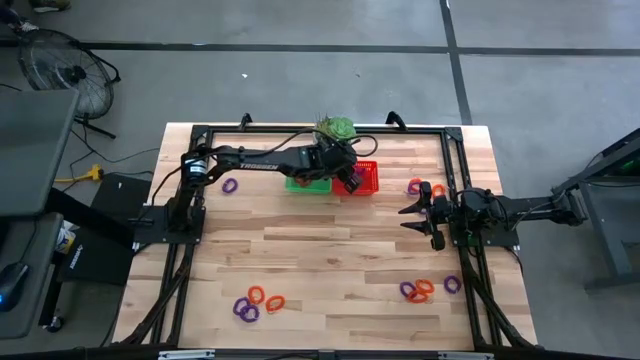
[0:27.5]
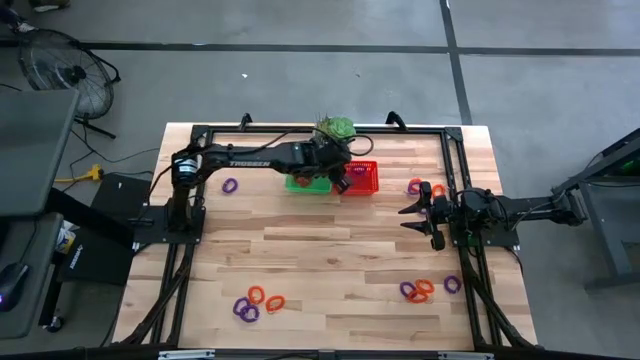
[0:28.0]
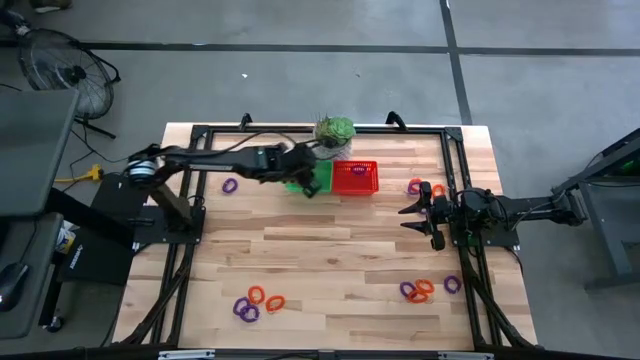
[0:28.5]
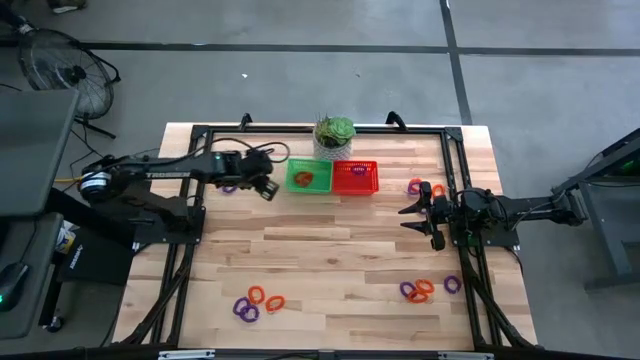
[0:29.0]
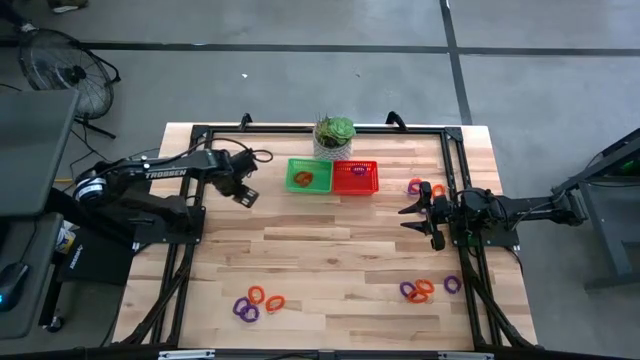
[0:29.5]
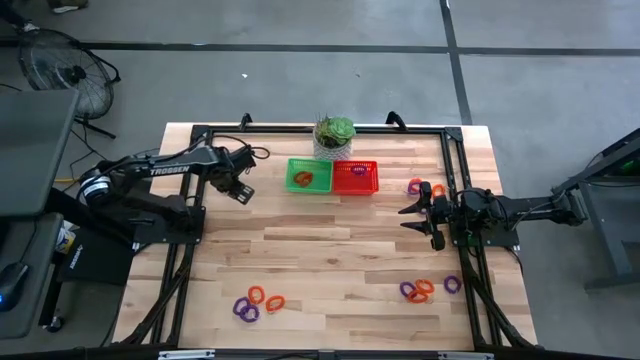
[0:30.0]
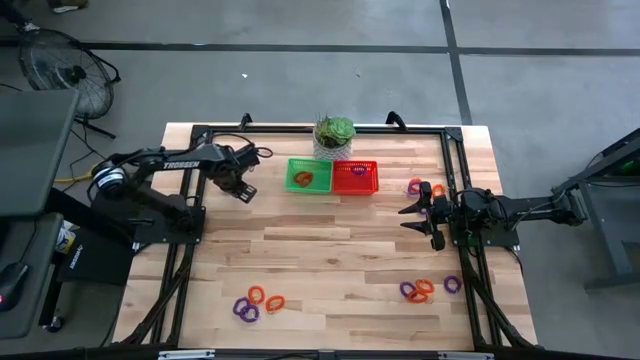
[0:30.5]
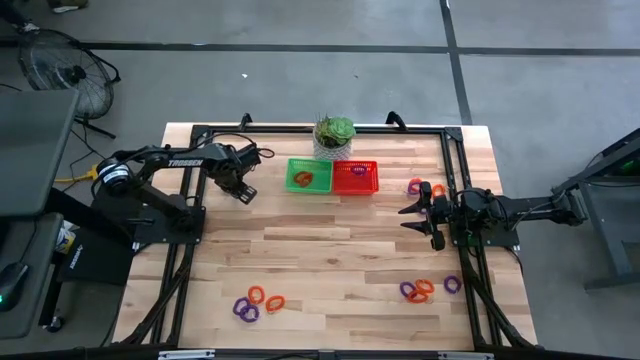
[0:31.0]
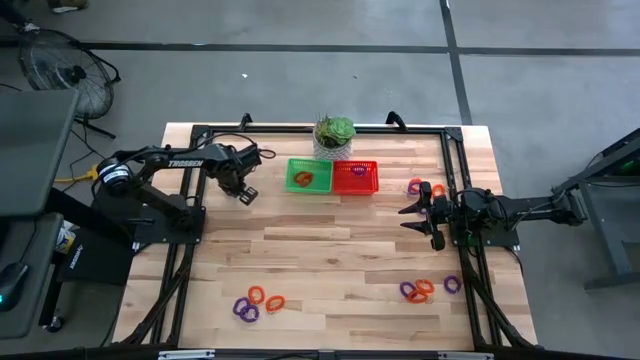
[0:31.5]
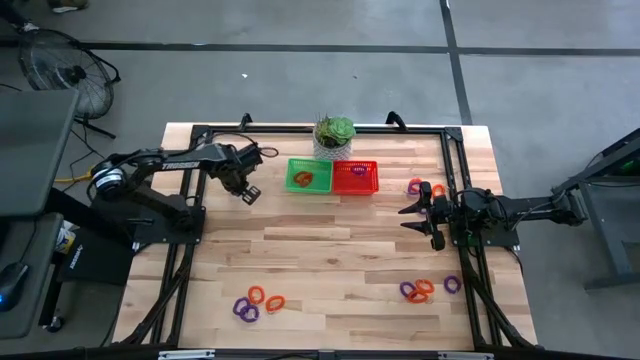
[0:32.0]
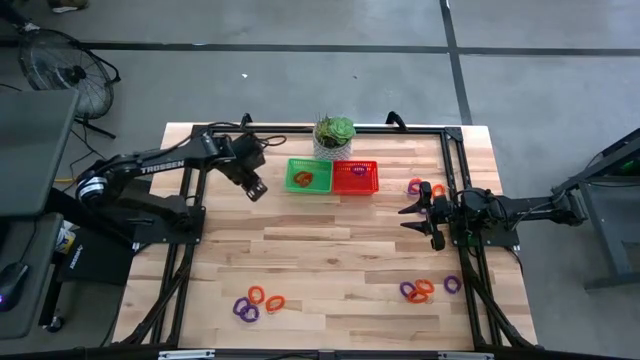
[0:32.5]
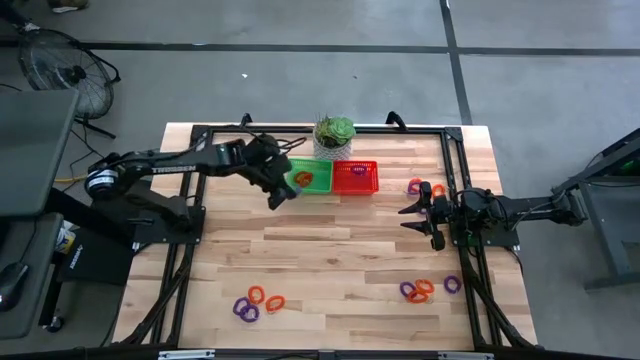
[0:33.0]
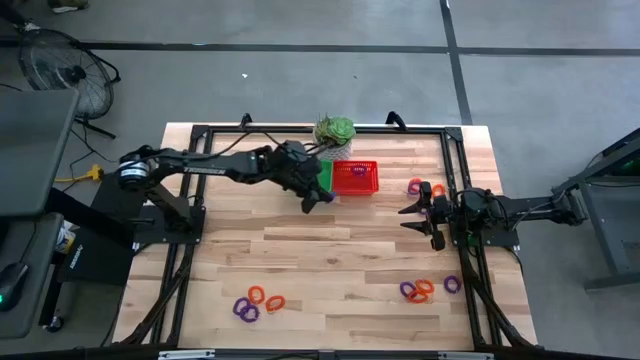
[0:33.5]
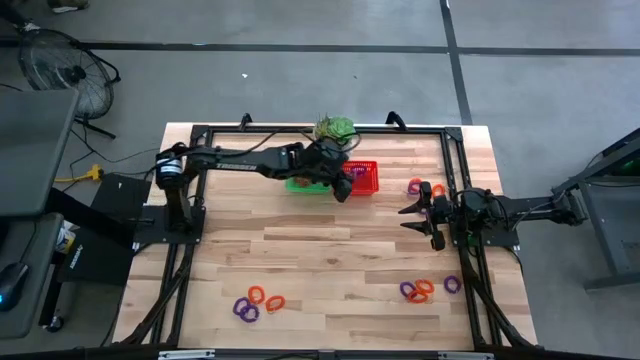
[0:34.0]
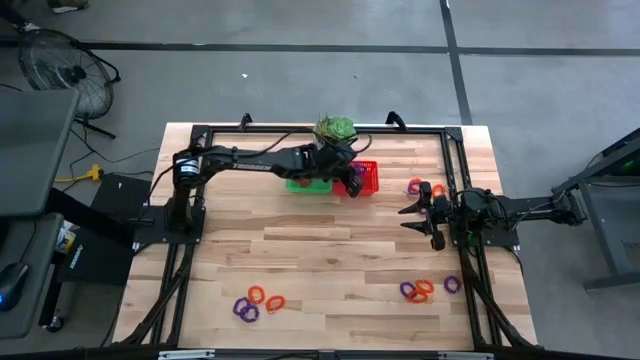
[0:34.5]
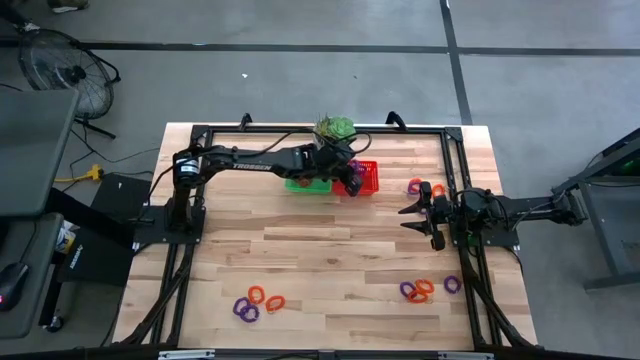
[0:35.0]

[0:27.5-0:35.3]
Task: Sort spring keychains
Put the purple spring keychain into the orange bin

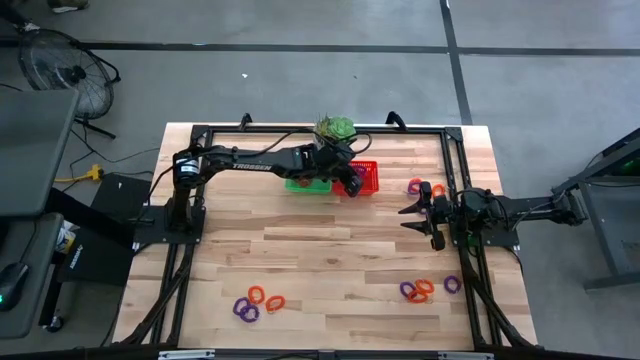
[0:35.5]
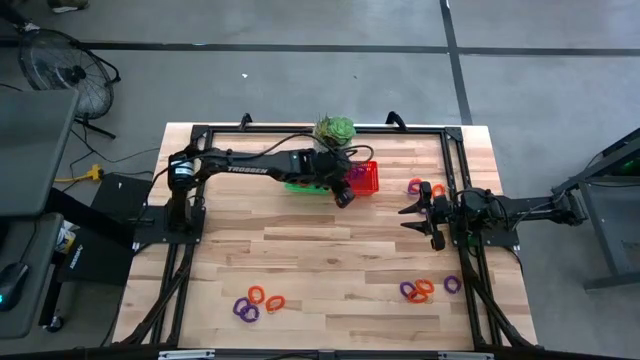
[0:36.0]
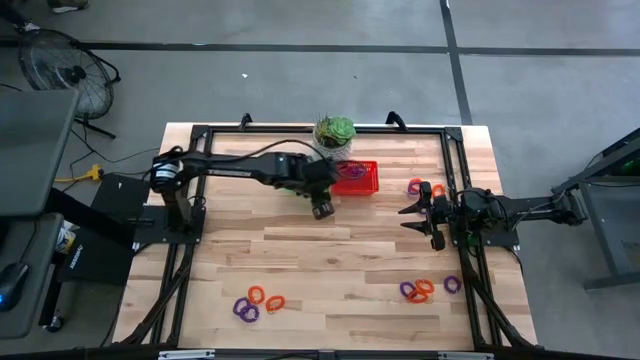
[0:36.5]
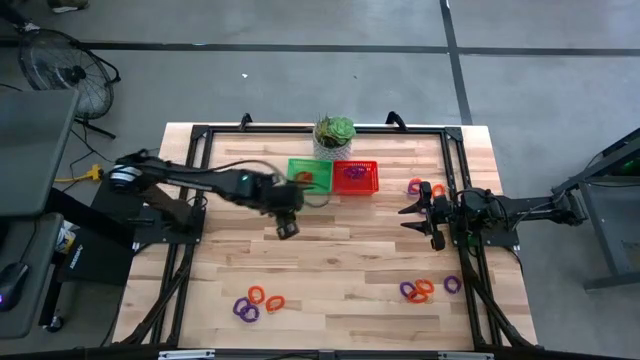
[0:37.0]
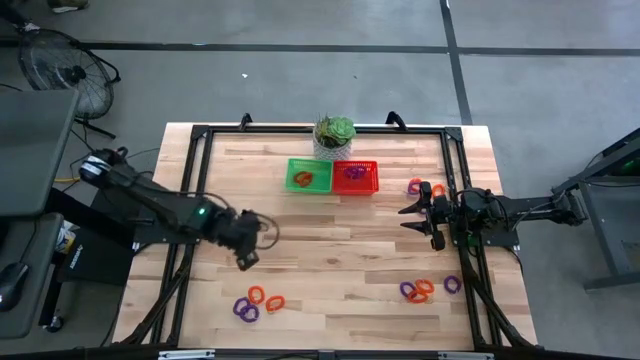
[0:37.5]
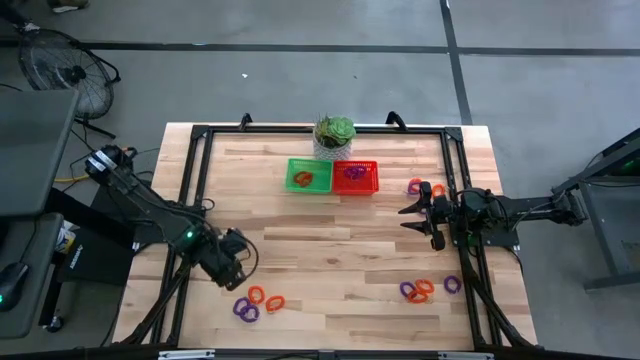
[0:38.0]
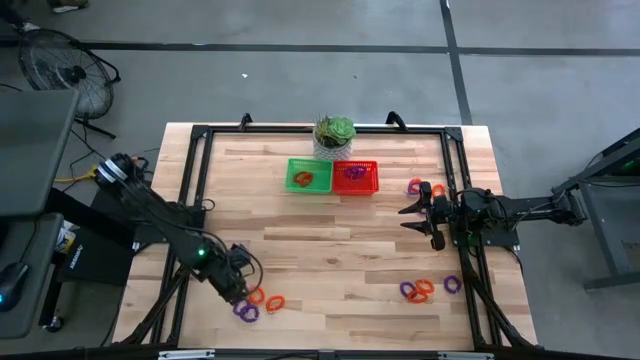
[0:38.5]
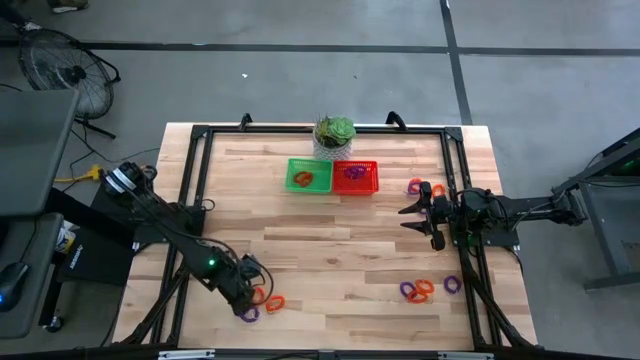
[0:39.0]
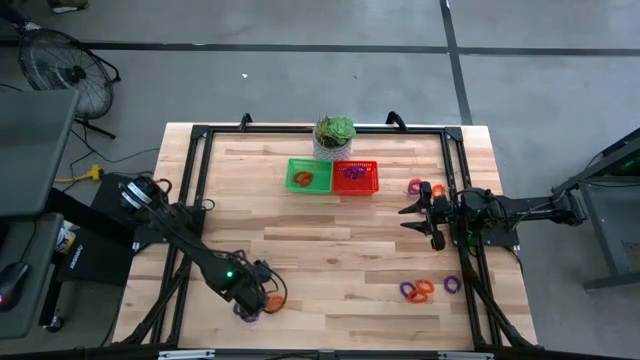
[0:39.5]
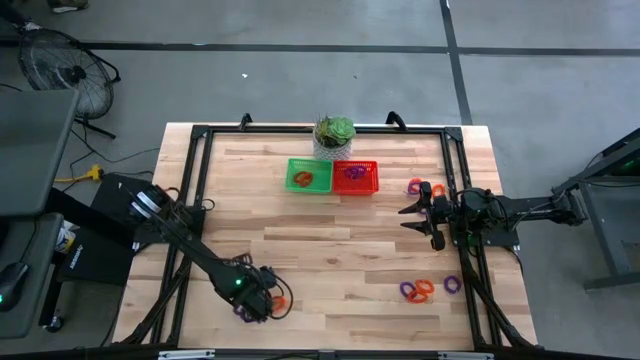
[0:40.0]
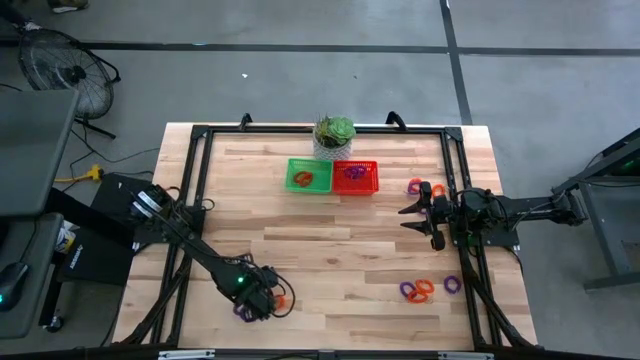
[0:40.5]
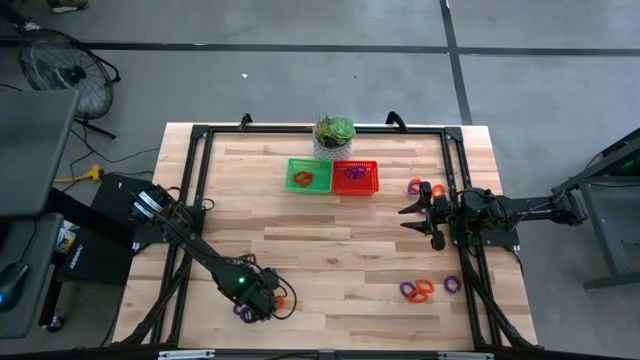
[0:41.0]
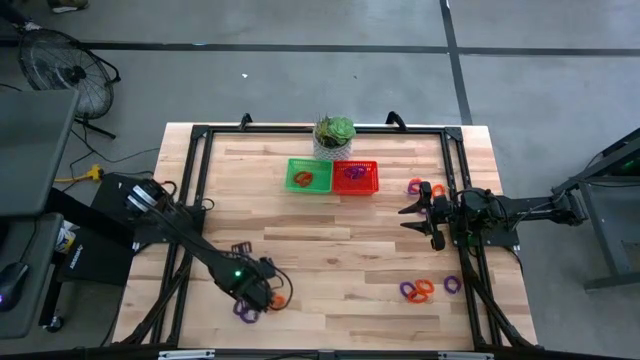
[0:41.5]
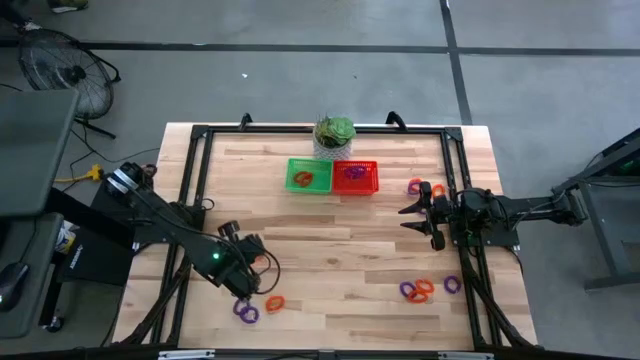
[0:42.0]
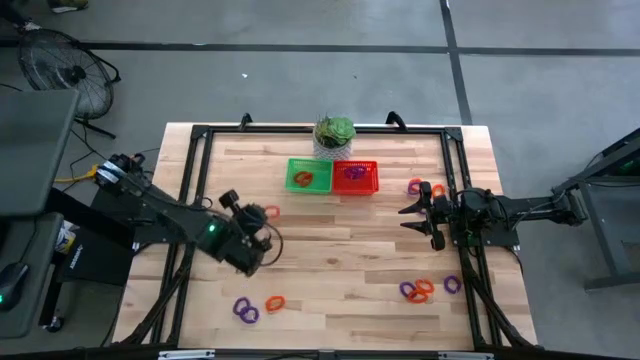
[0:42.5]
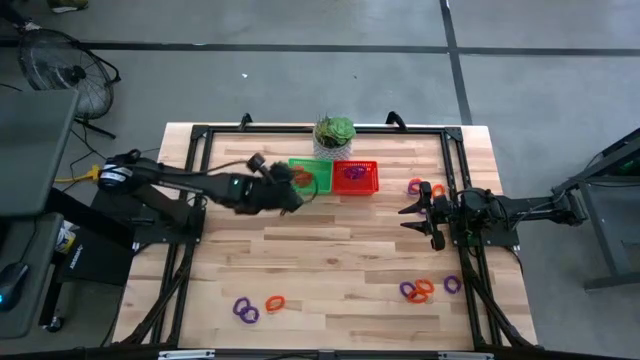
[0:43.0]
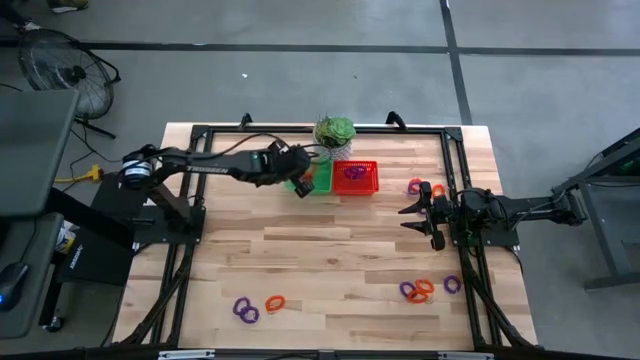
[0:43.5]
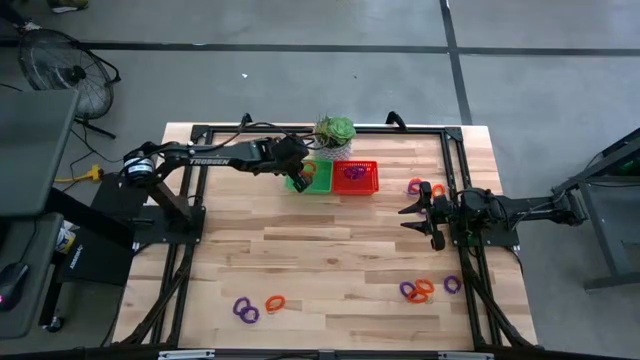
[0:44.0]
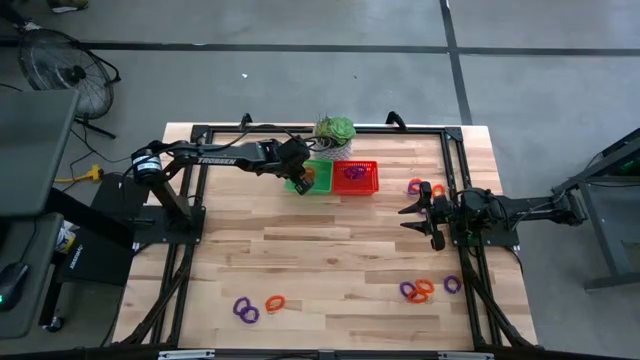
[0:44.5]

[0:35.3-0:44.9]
Put the orange spring keychain into the green bin

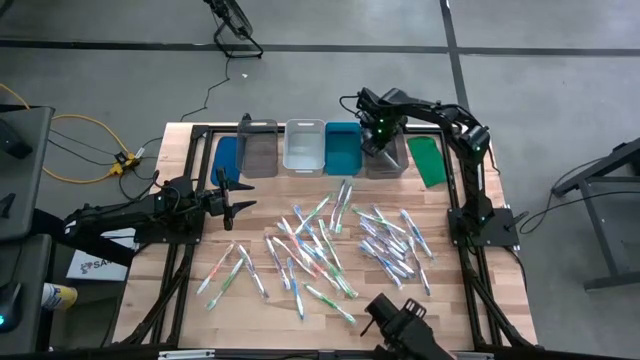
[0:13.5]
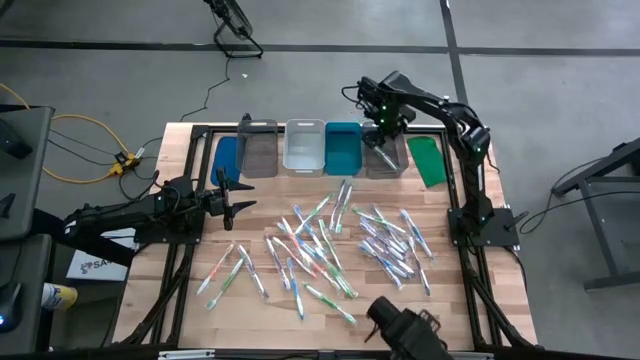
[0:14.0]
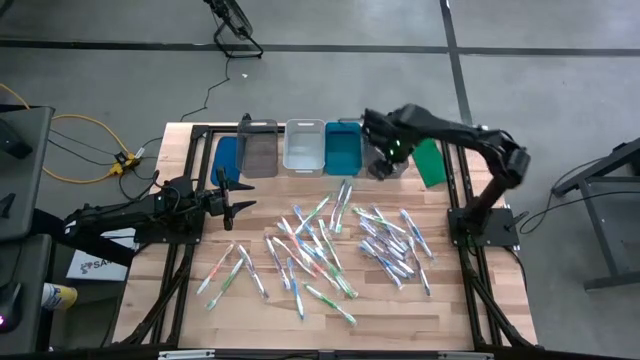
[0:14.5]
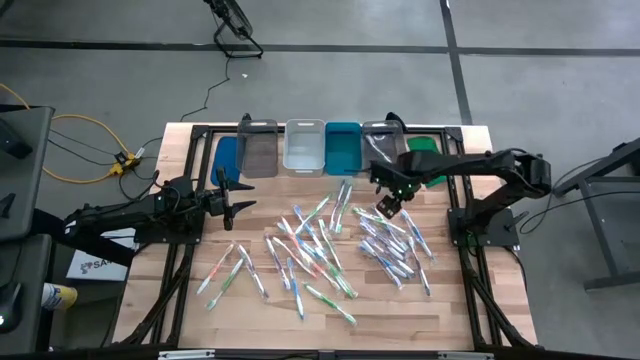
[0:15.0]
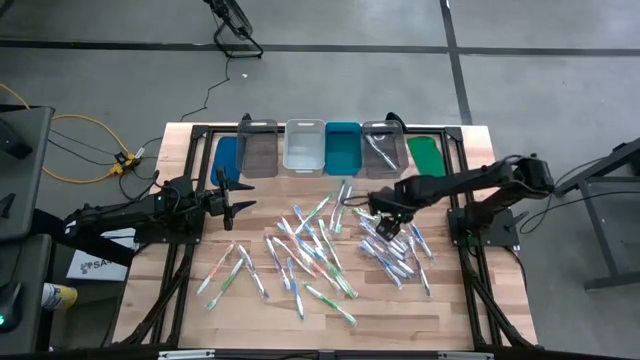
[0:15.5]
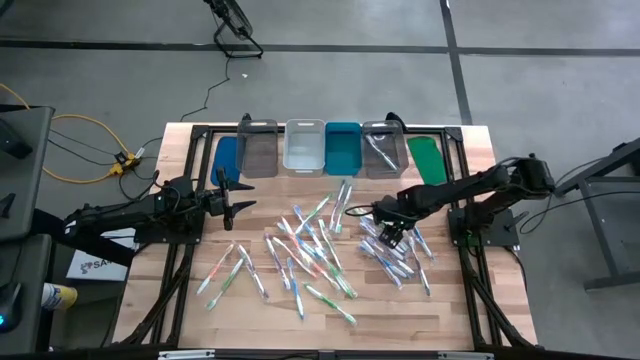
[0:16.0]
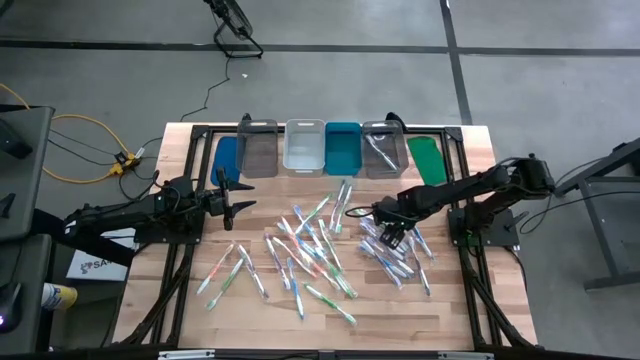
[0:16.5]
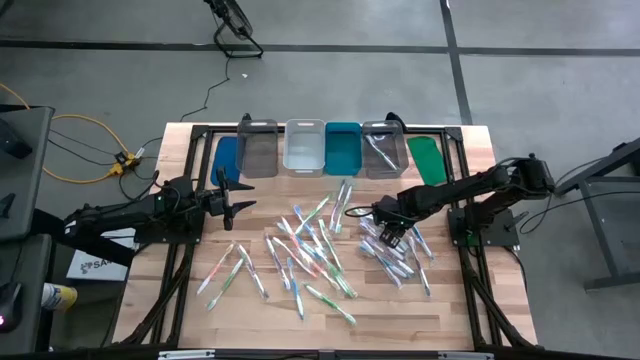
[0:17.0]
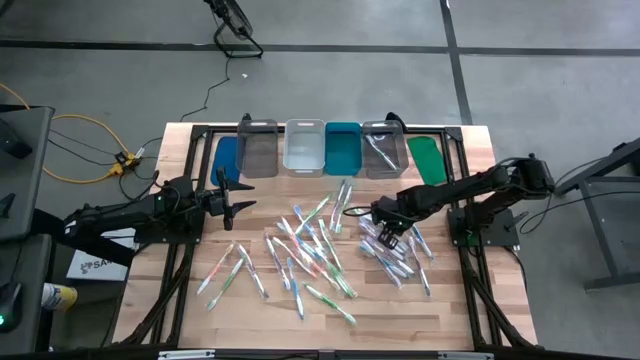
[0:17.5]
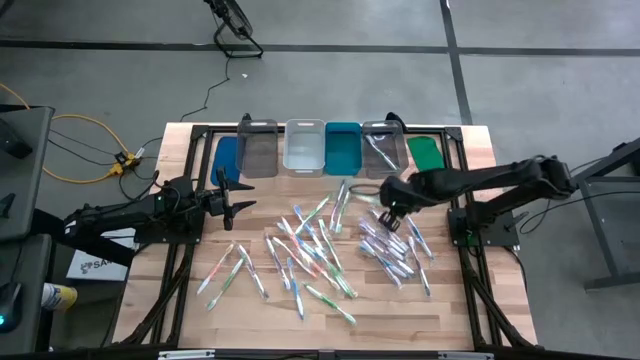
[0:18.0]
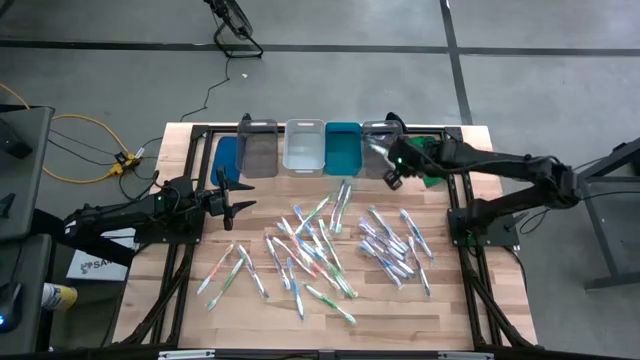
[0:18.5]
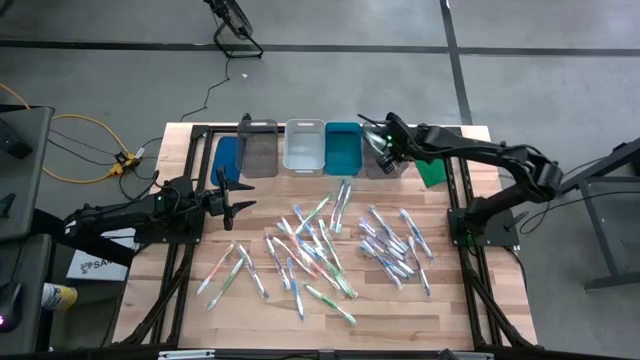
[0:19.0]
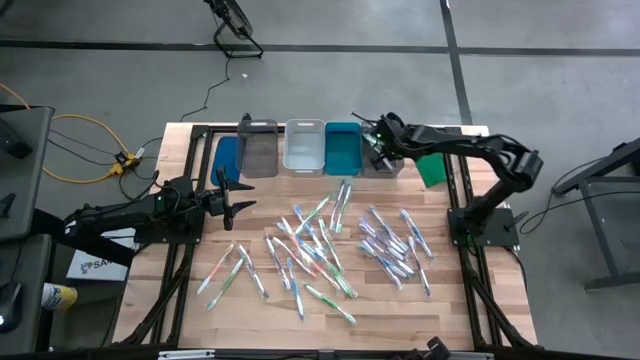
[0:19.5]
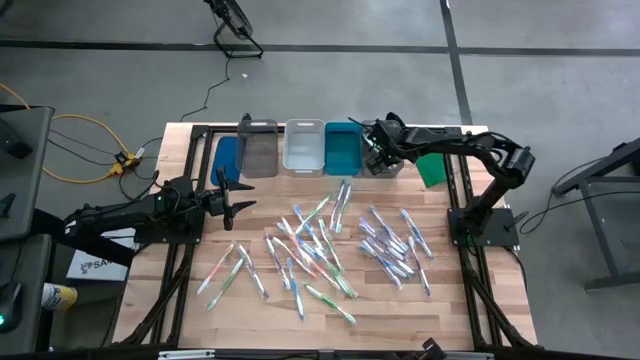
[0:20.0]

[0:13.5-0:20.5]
Task: Pick & Place Toothbrushes
Put the green toothbrush into the right black bin
